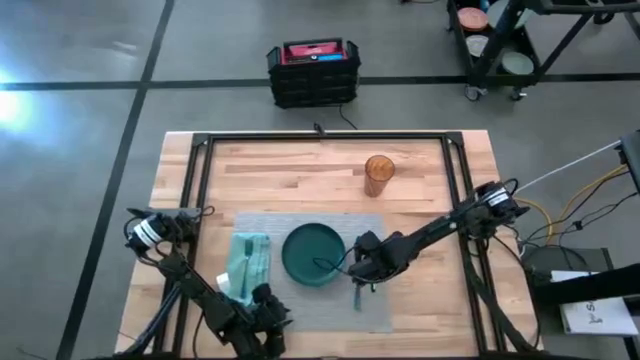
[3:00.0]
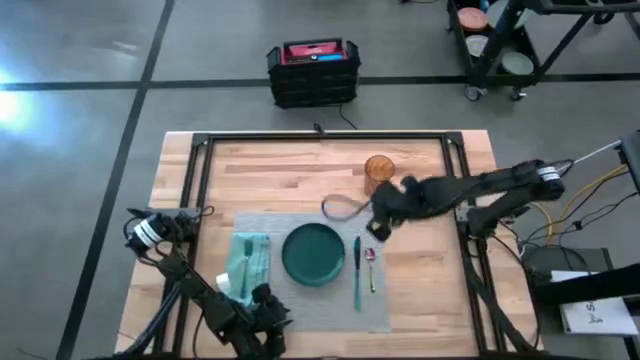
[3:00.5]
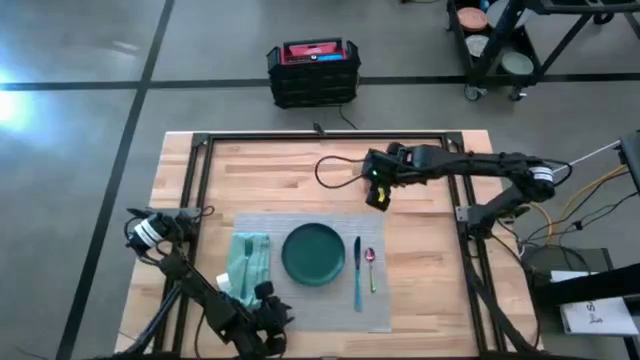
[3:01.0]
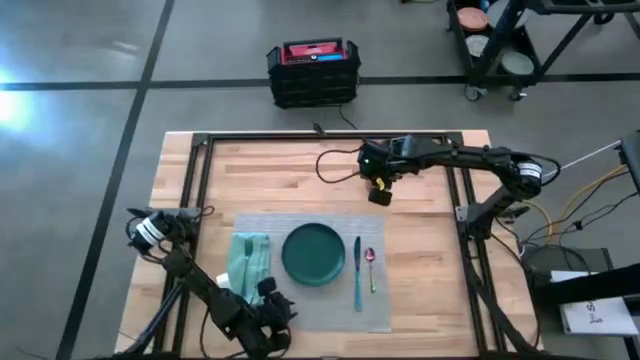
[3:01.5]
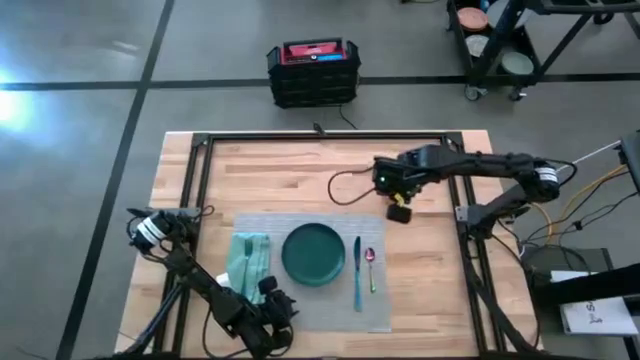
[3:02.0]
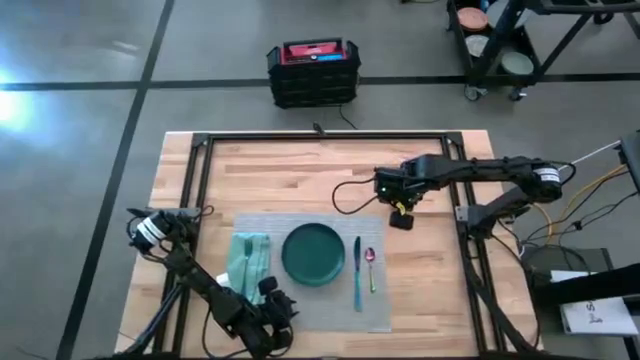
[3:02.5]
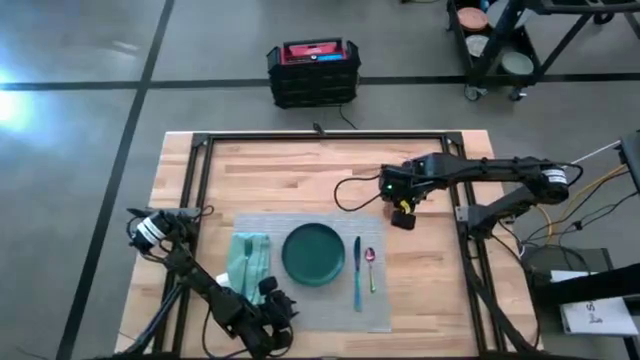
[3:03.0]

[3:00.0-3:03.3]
Task: Set table place
Return to Home Position

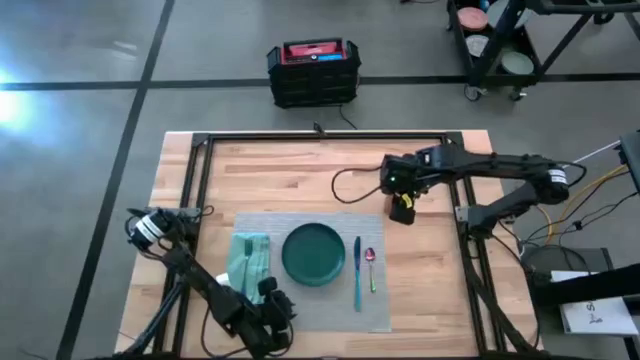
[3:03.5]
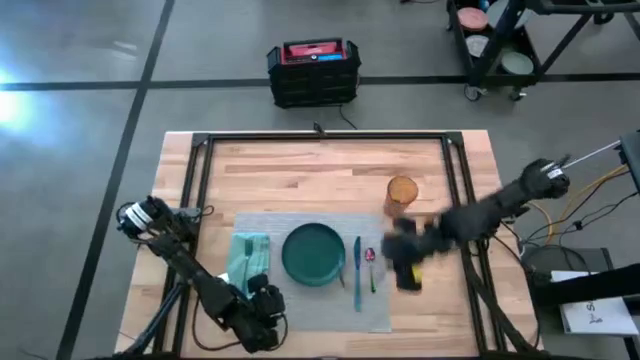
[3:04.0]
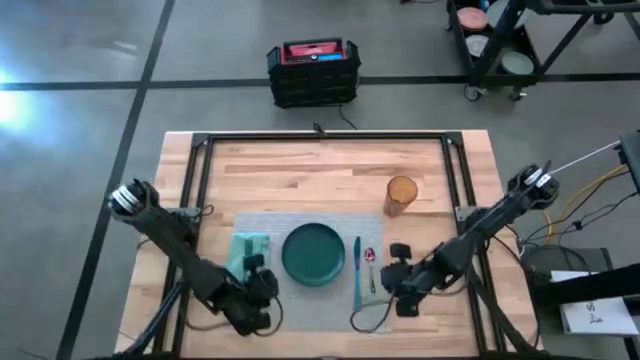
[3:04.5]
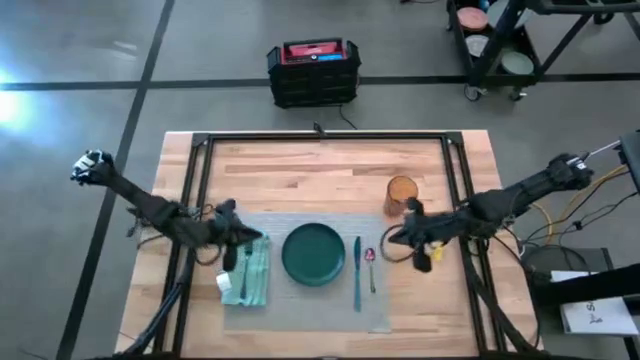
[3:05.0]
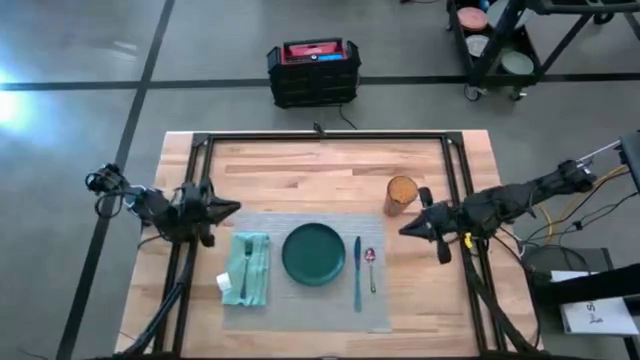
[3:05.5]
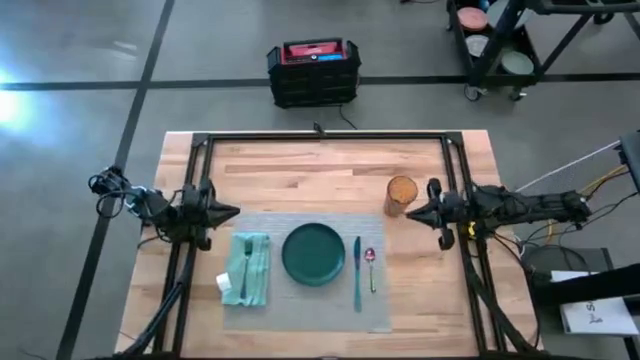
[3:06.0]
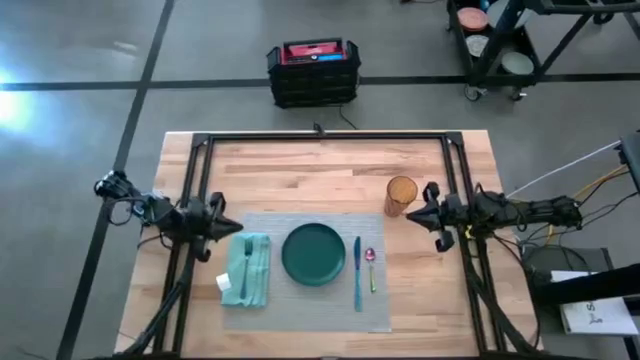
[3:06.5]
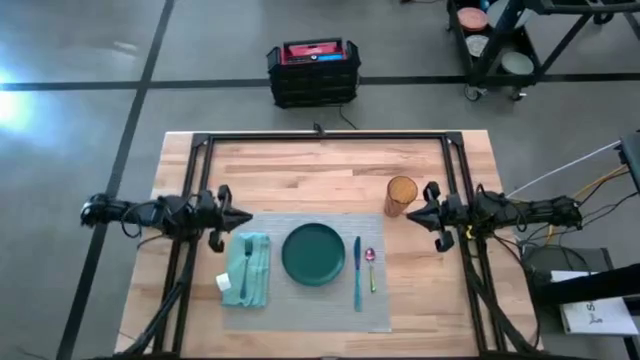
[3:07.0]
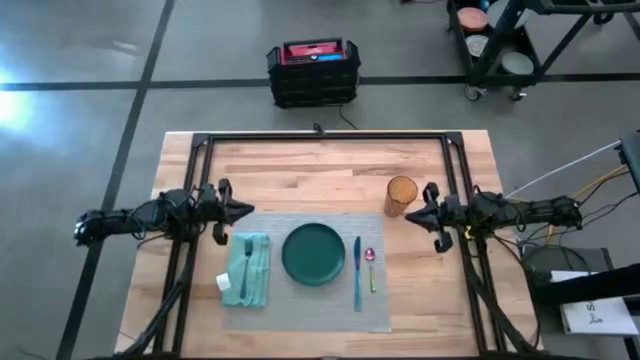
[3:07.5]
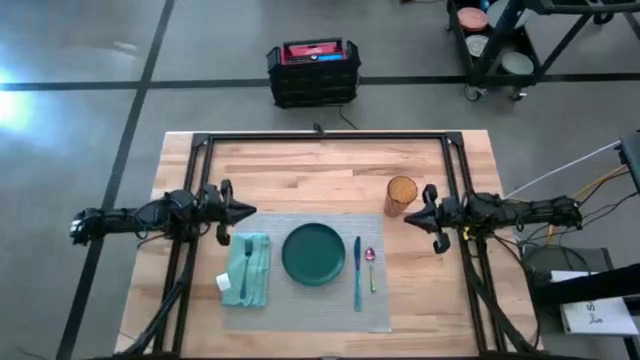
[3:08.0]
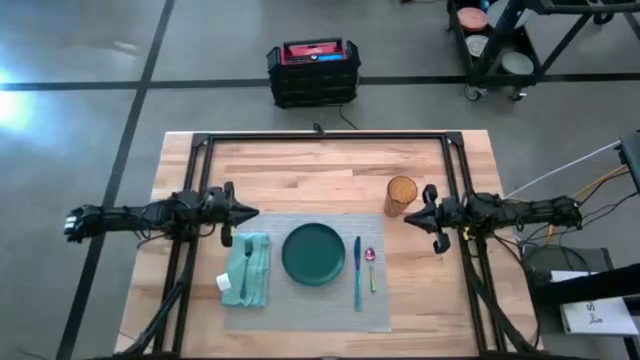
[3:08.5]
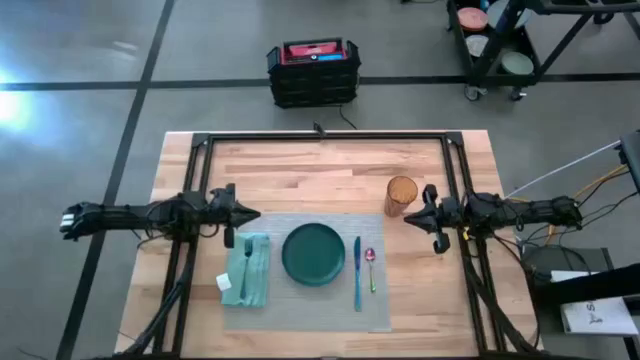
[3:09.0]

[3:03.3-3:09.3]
Adjust the red cup

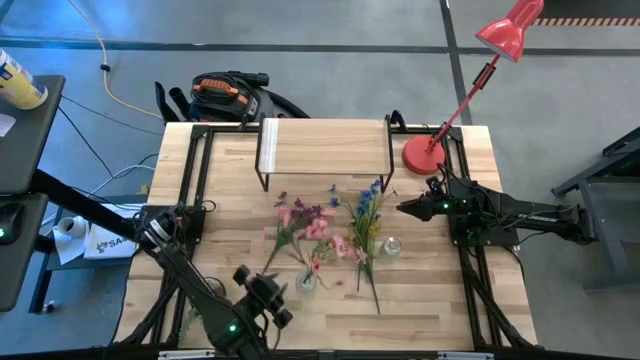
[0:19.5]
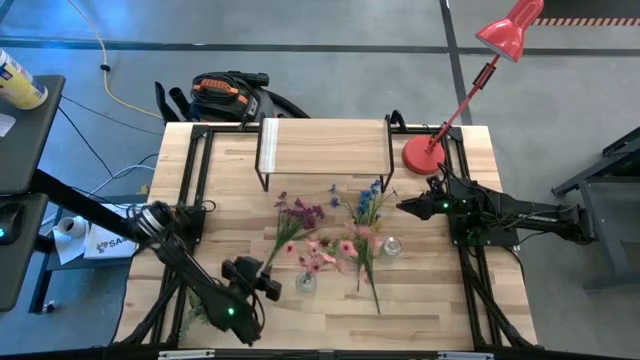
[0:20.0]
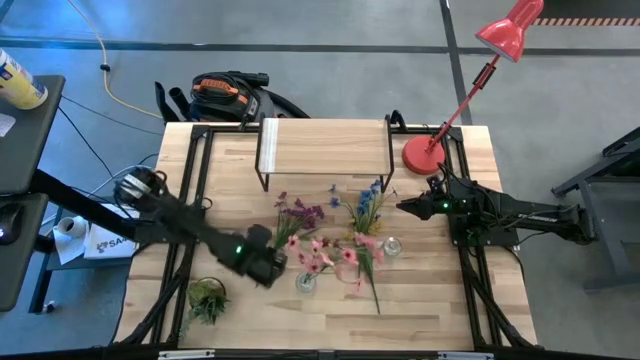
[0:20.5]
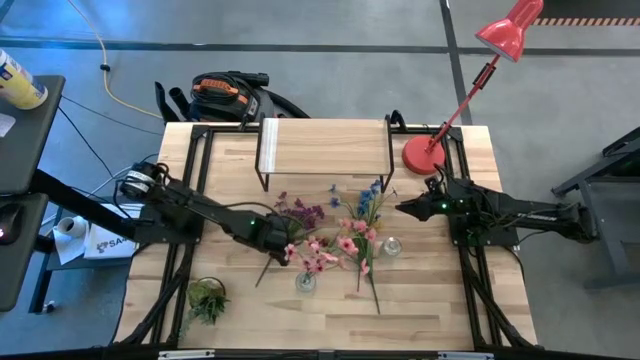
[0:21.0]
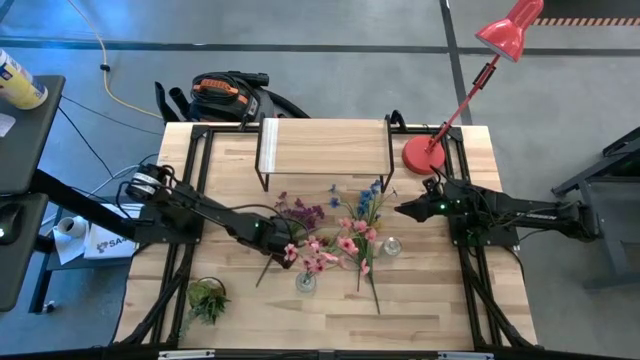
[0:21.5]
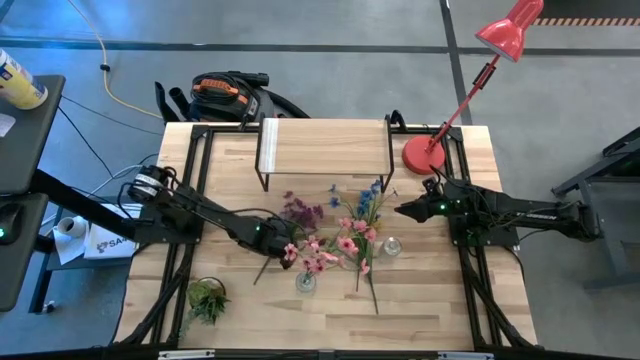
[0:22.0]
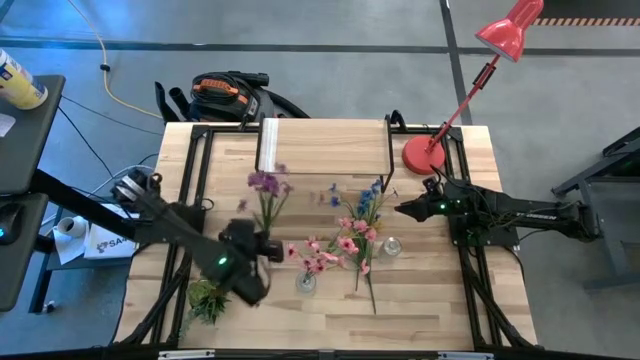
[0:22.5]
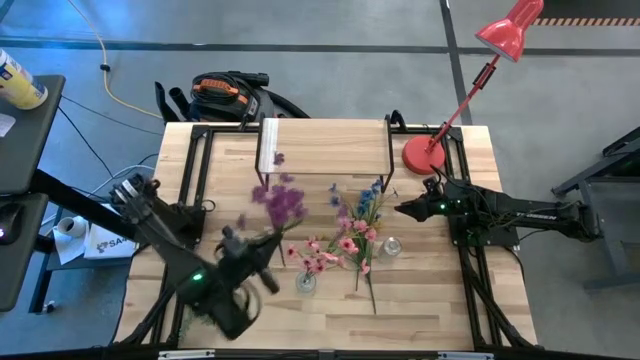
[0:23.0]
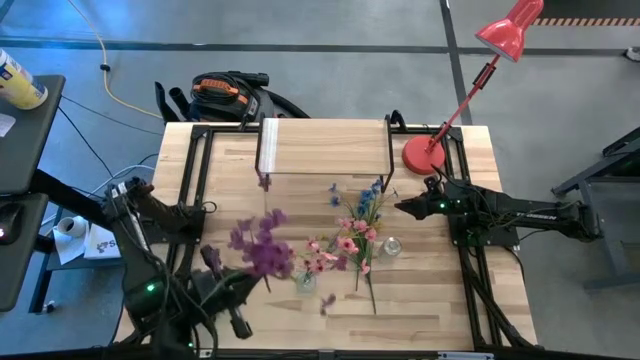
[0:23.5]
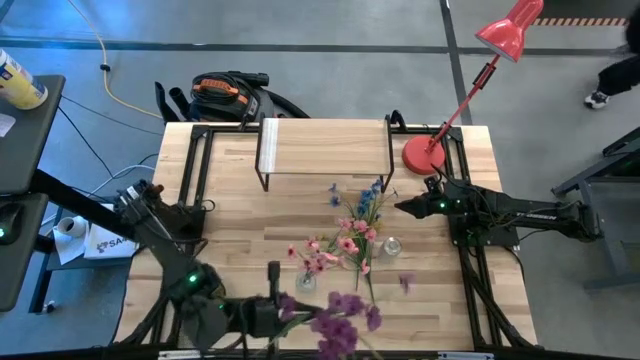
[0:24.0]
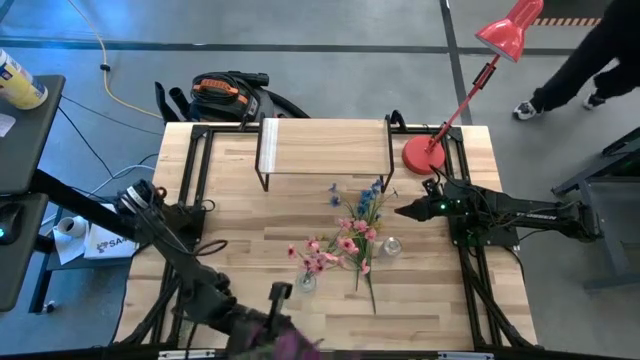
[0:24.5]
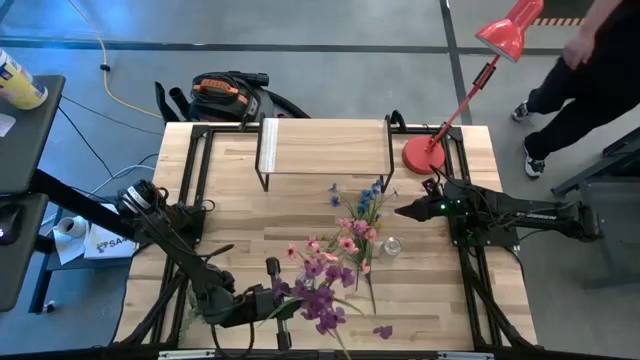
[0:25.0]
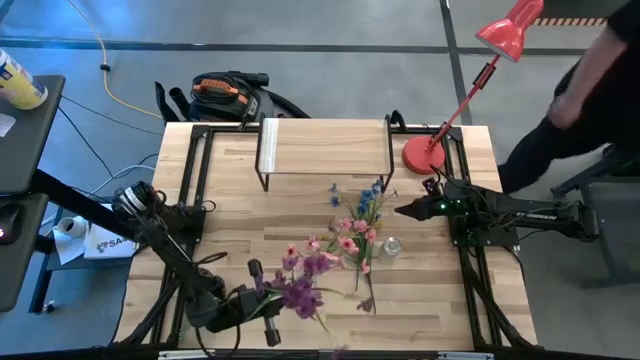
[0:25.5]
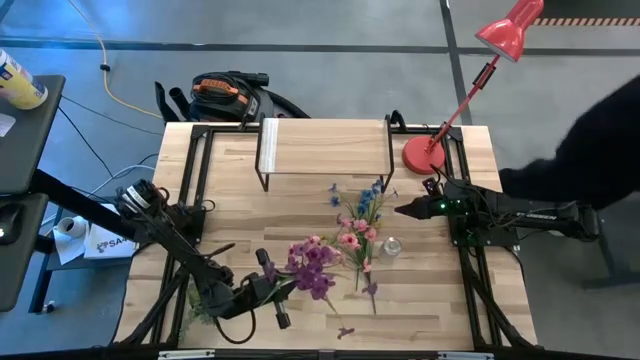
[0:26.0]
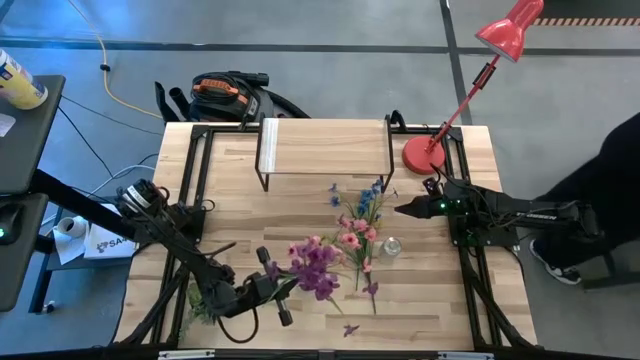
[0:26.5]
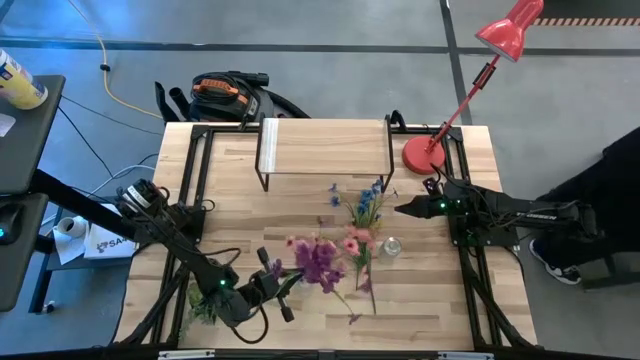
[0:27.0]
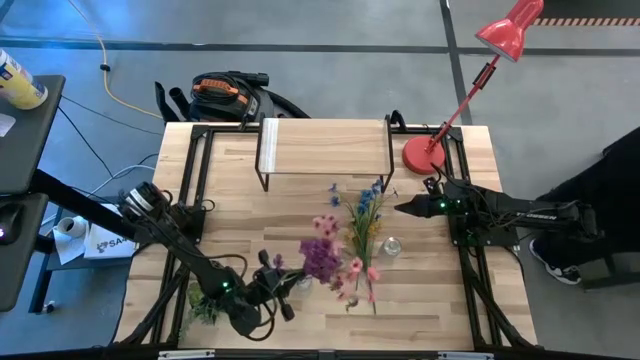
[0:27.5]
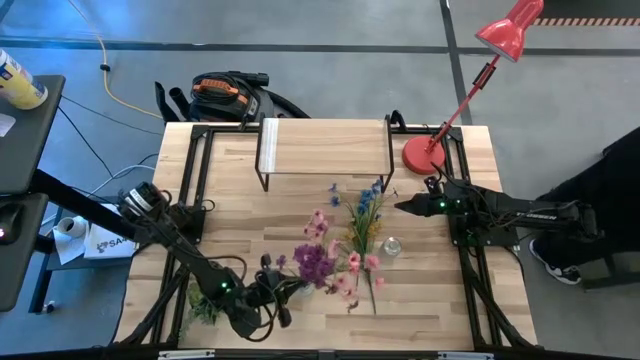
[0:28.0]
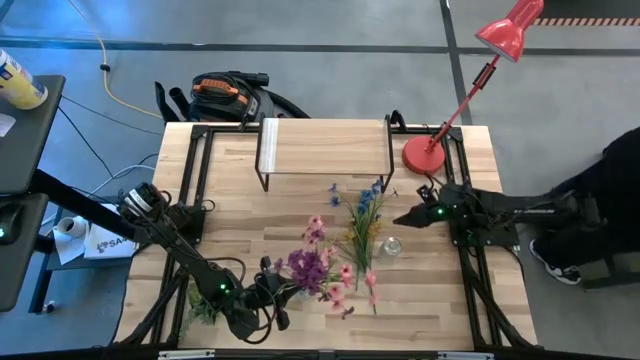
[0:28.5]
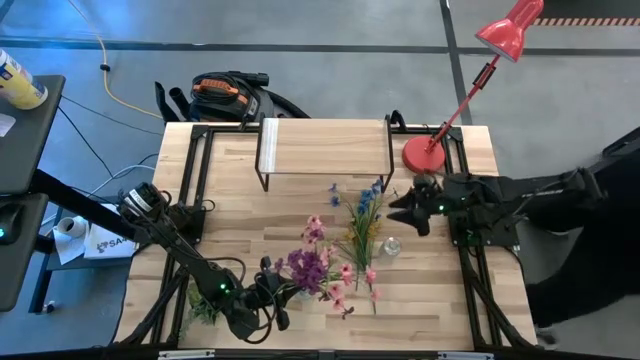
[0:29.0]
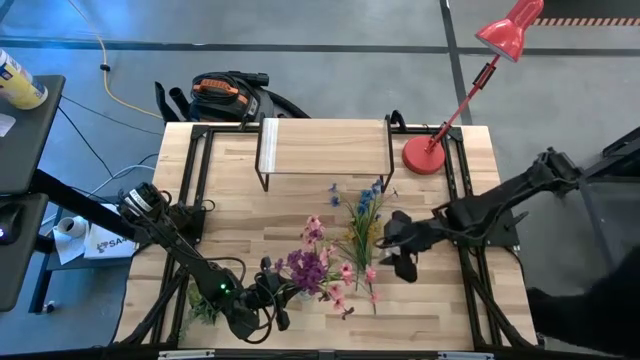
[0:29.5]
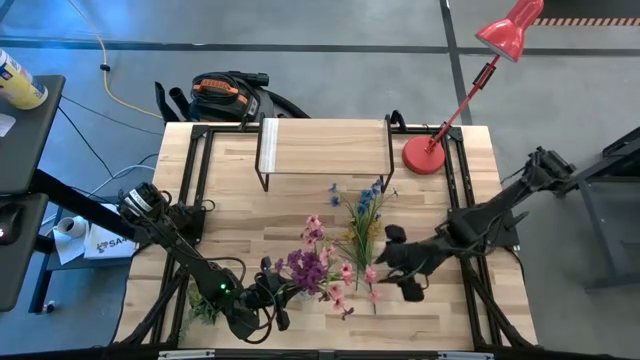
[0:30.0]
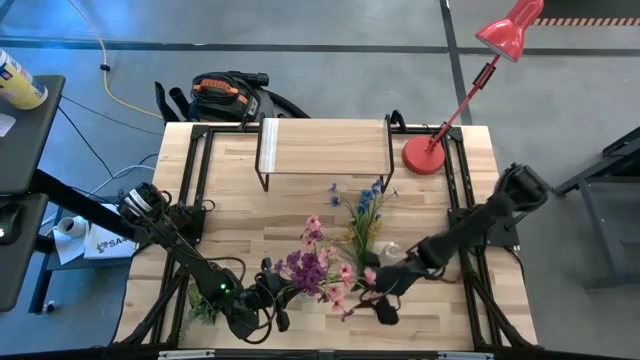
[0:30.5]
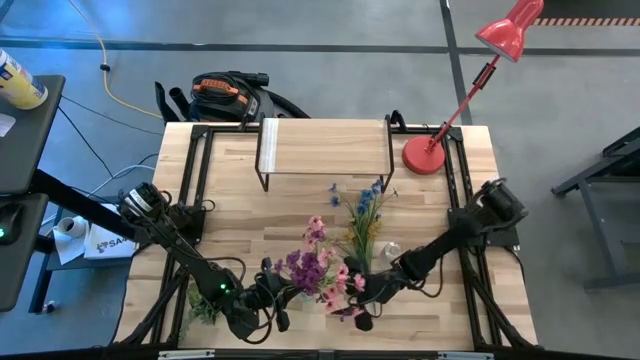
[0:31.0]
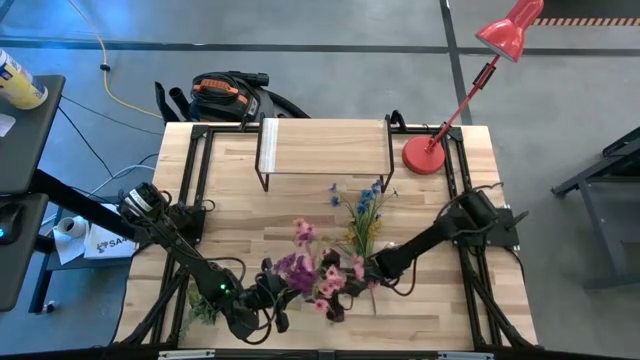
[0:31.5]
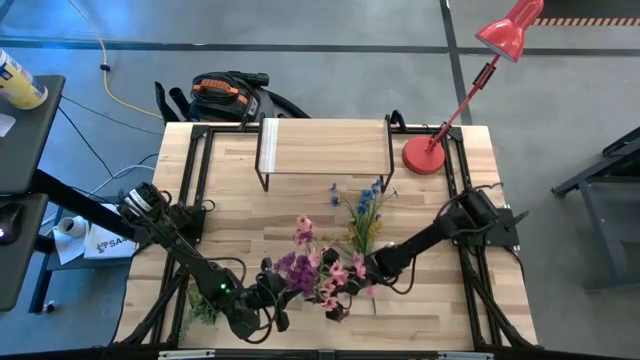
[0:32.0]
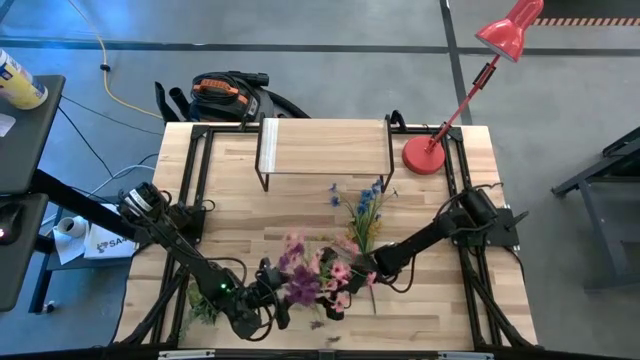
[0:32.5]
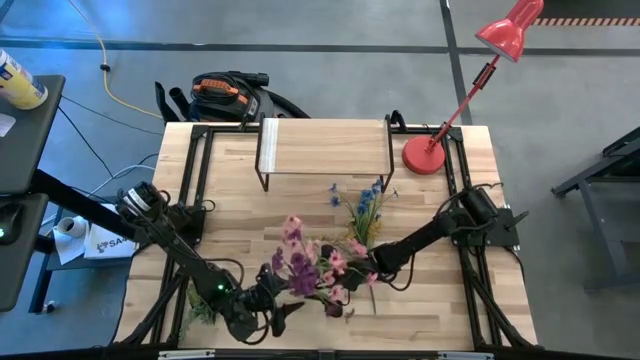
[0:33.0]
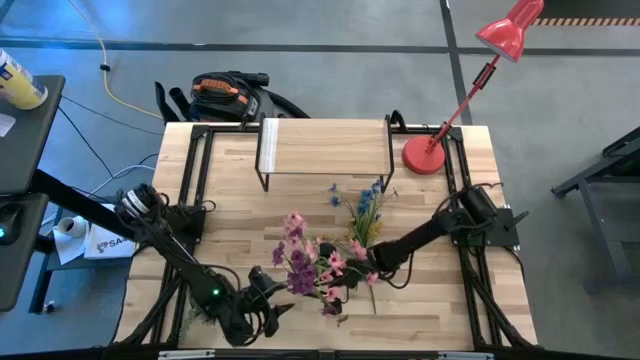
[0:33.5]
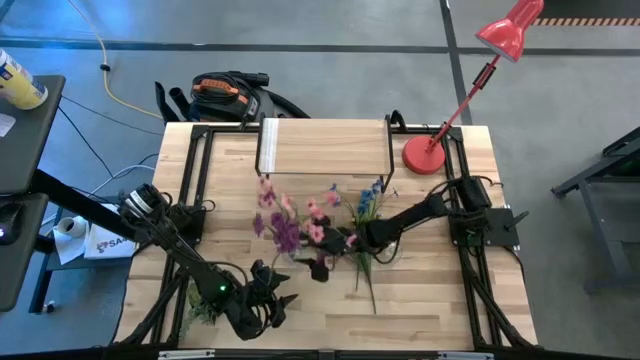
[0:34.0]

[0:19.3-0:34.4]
Task: Pick and place flowers into a vace then onto a shelf
Put the purple flowers into the left transparent vase
